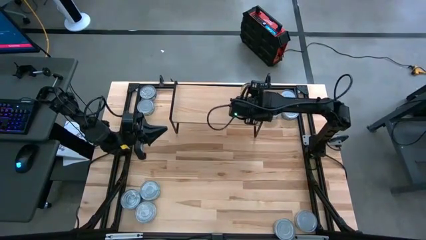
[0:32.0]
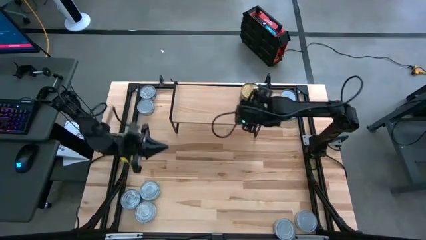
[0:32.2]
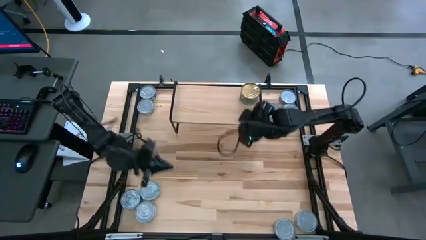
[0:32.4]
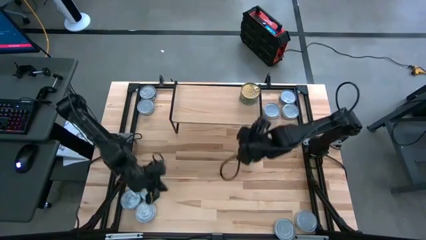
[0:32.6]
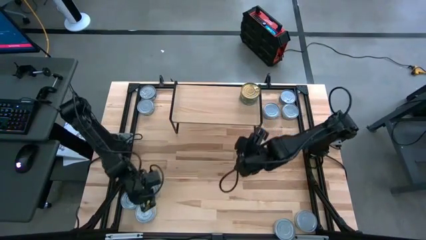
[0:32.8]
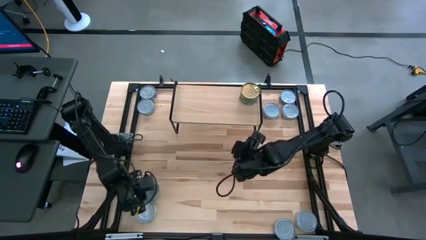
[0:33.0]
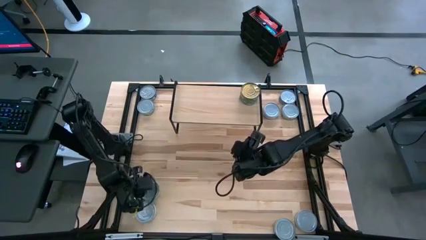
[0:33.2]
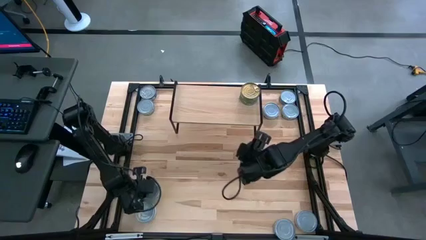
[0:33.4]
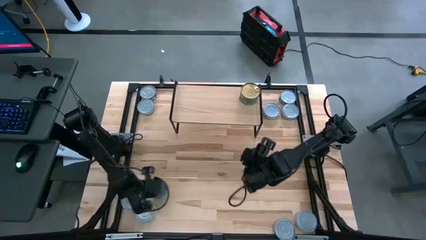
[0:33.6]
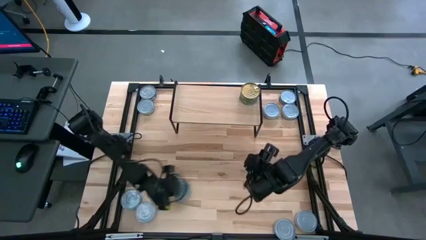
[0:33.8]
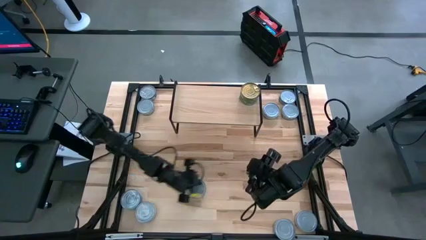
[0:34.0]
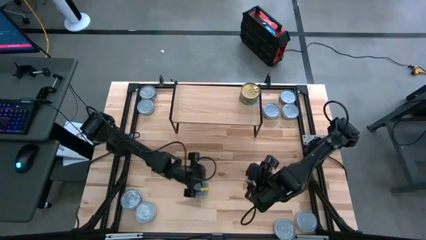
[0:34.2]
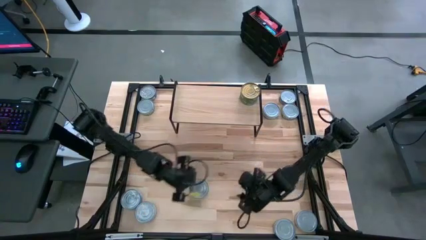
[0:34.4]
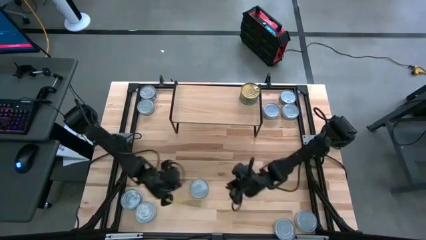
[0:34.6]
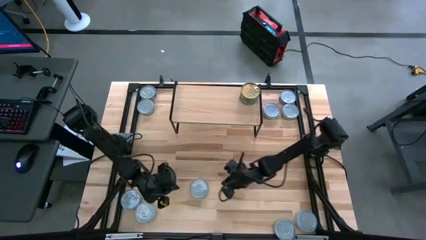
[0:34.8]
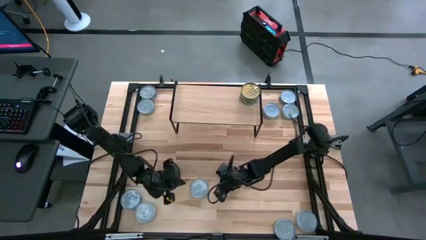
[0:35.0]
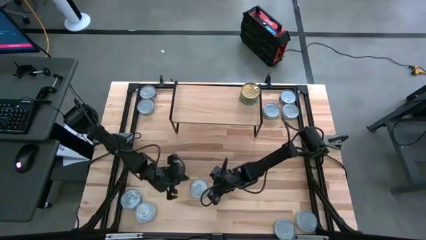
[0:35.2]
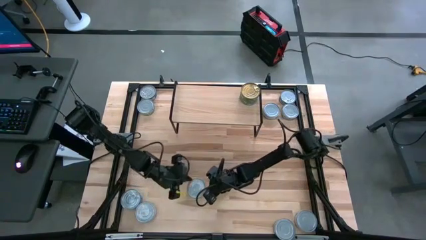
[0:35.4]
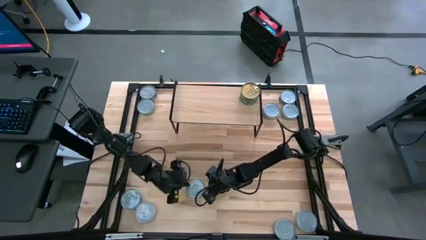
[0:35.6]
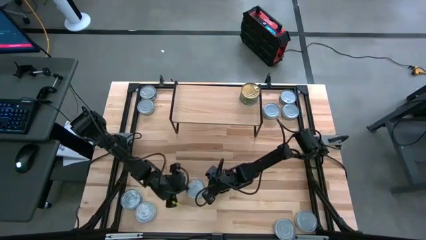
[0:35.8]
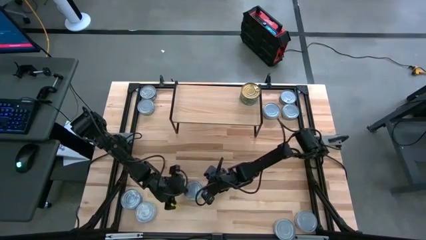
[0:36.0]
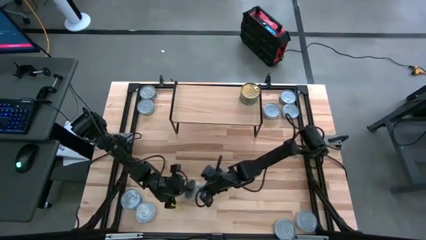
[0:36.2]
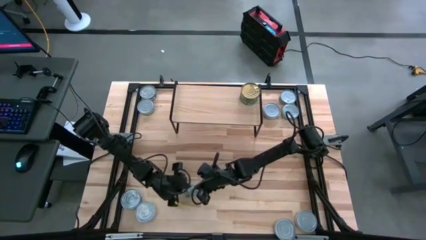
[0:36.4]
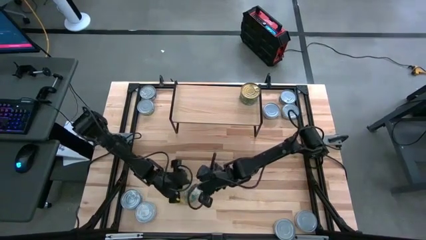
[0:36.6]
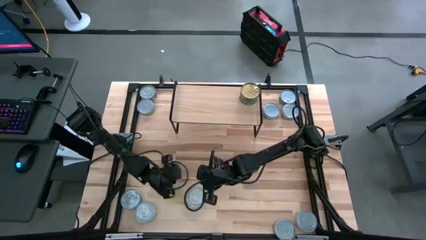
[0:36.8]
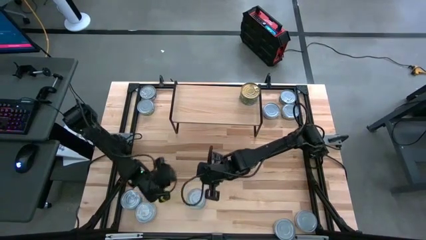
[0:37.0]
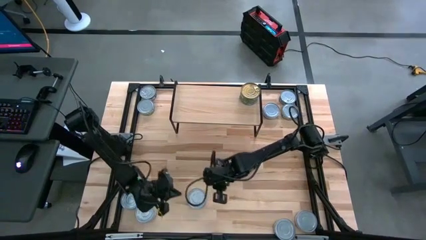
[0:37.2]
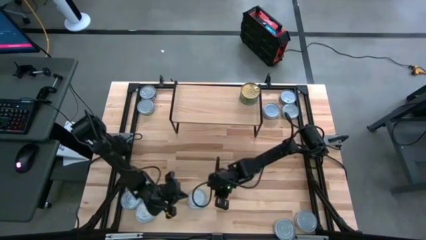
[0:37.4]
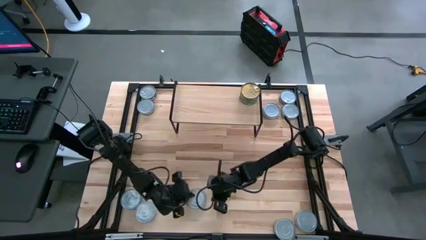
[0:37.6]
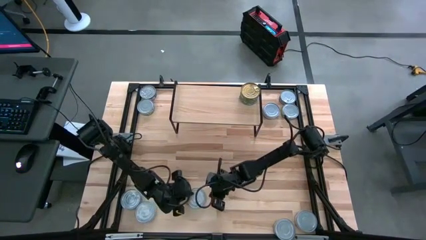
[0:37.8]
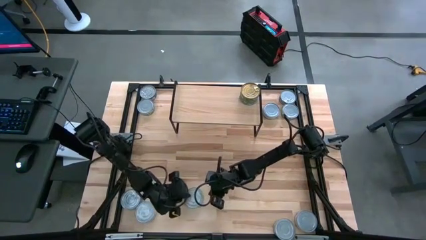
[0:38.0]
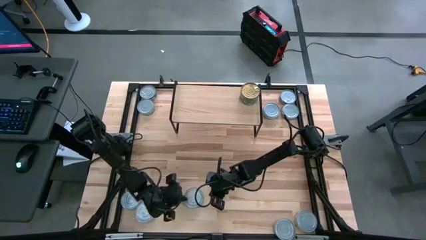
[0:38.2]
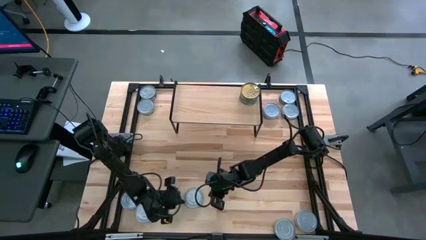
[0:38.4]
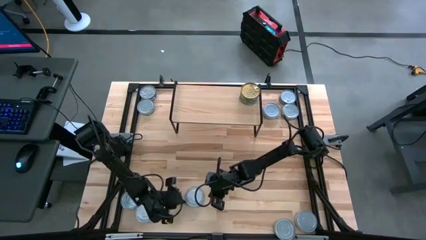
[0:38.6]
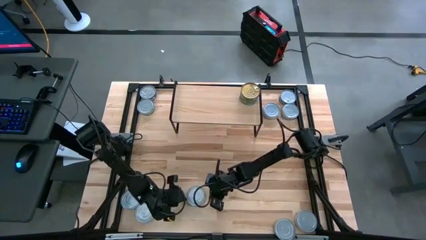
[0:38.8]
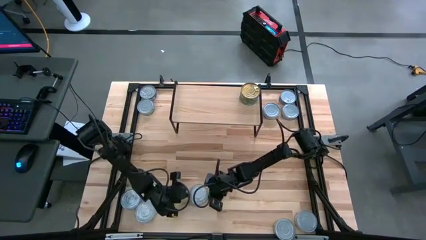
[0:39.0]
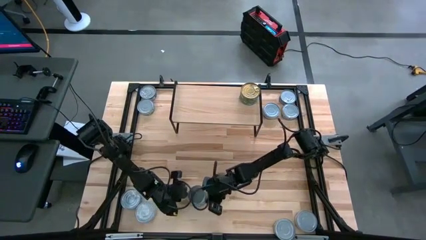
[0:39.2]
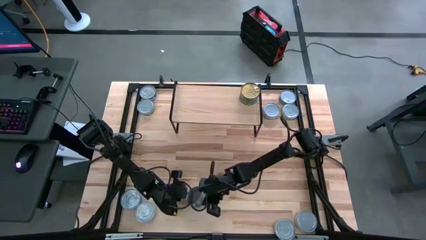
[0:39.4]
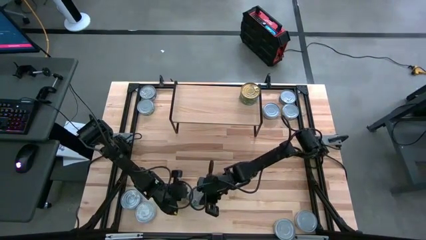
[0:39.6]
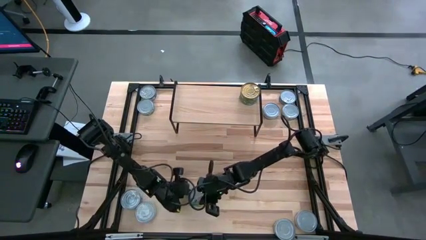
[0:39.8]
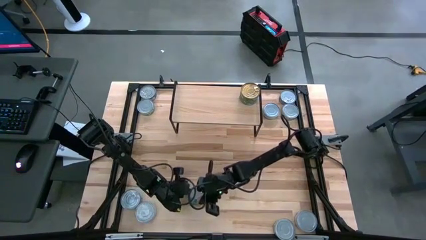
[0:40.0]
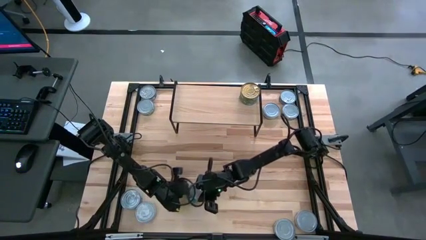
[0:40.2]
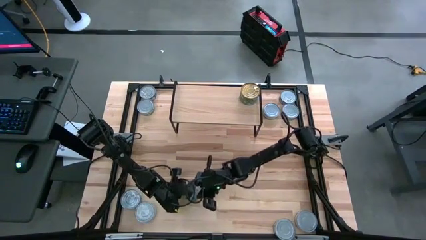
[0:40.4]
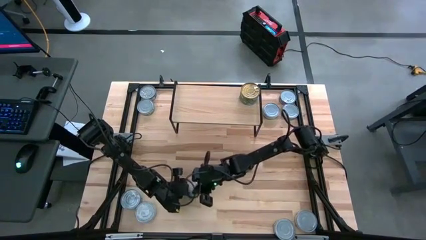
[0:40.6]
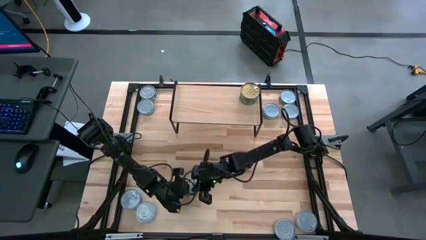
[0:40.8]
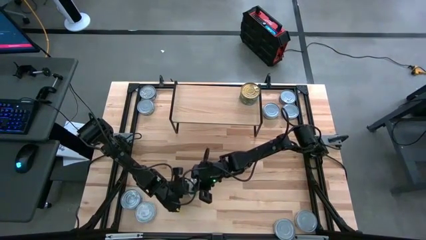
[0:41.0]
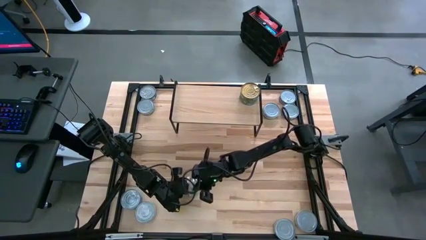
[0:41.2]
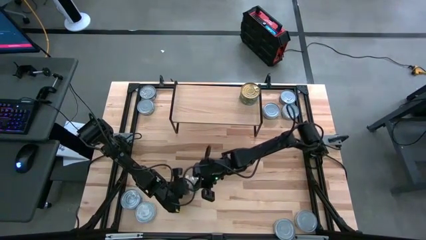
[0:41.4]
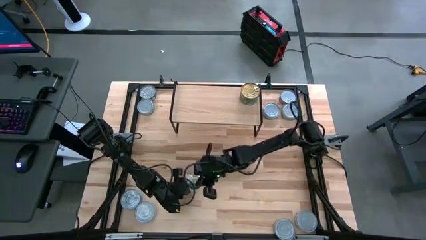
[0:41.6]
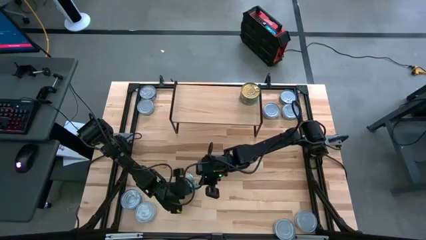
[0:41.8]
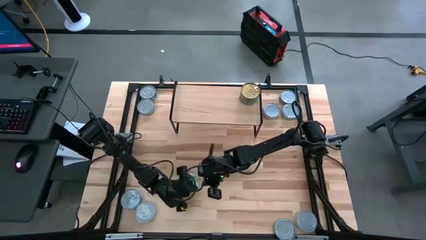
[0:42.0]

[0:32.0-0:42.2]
Task: Stack canned seafood by type on shelf
Put the light green tuna can on the shelf

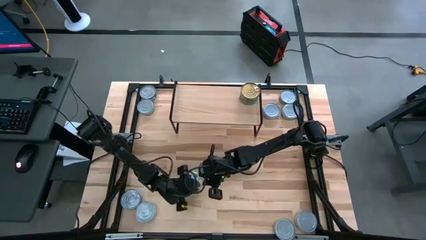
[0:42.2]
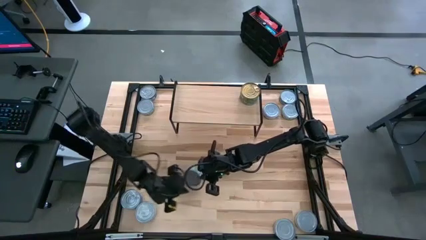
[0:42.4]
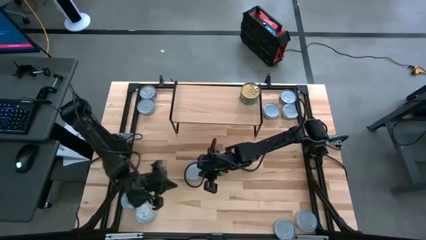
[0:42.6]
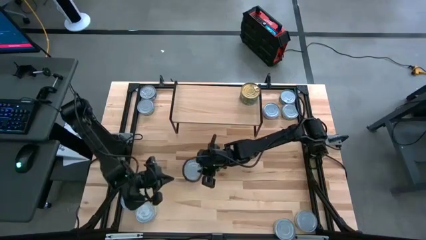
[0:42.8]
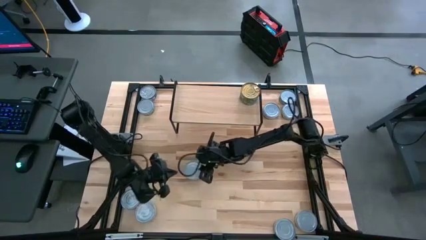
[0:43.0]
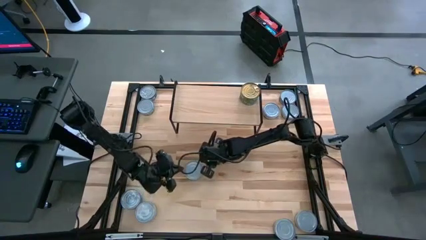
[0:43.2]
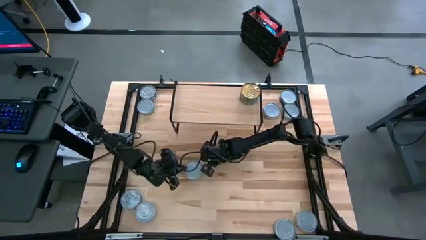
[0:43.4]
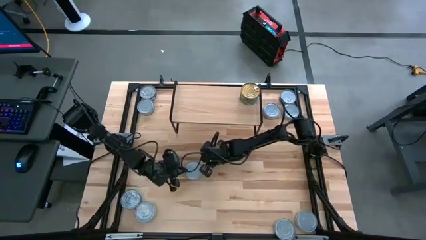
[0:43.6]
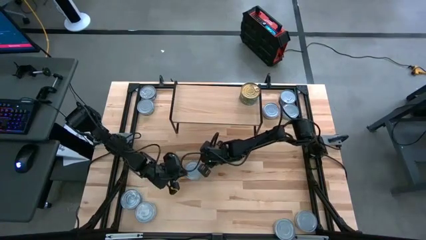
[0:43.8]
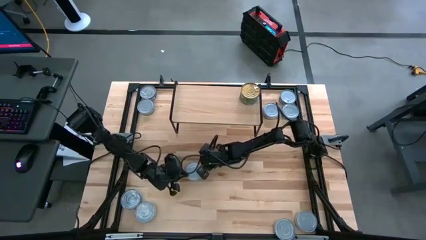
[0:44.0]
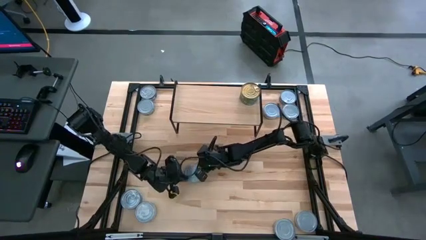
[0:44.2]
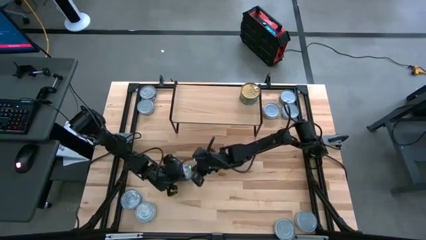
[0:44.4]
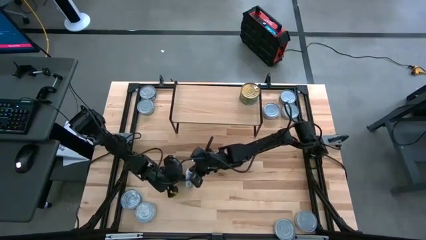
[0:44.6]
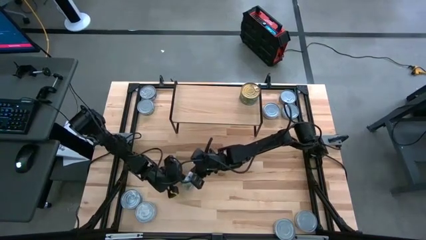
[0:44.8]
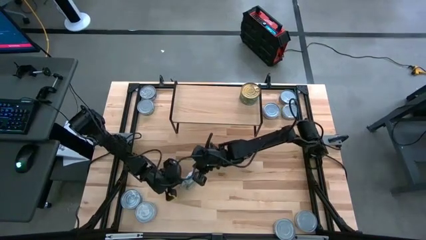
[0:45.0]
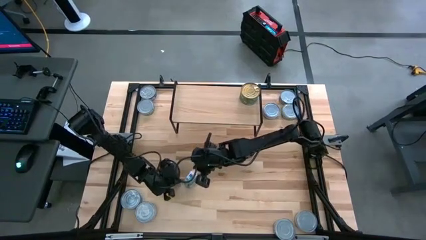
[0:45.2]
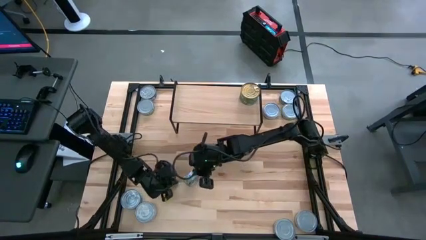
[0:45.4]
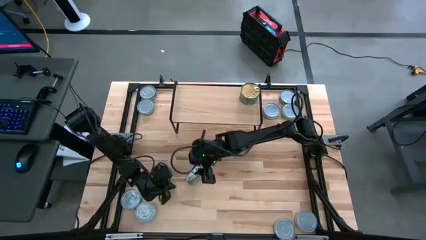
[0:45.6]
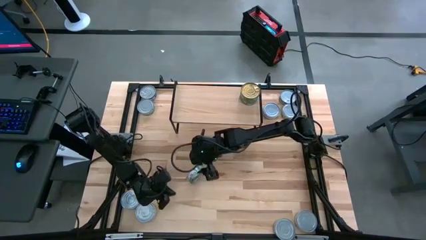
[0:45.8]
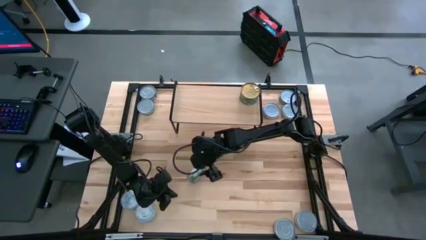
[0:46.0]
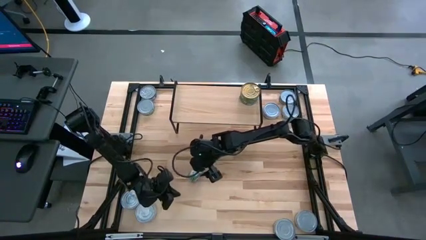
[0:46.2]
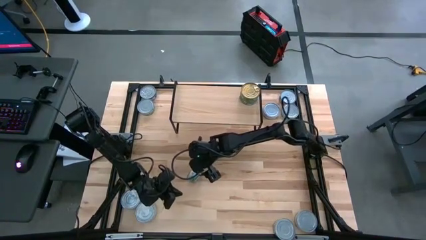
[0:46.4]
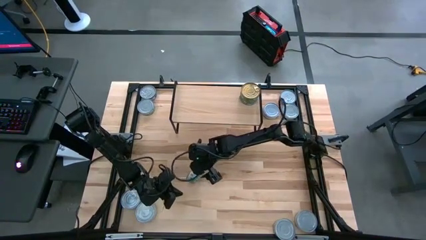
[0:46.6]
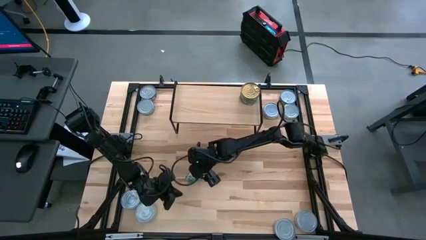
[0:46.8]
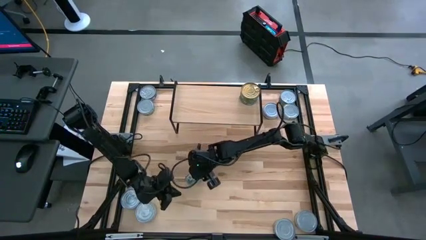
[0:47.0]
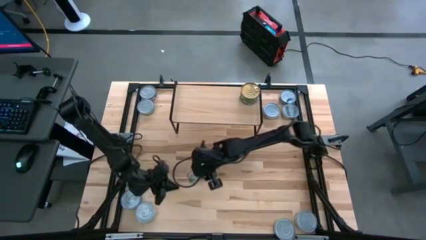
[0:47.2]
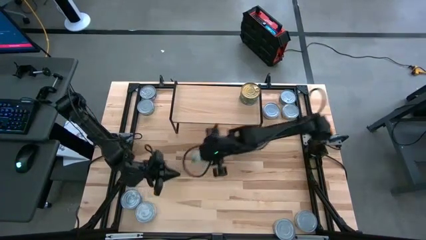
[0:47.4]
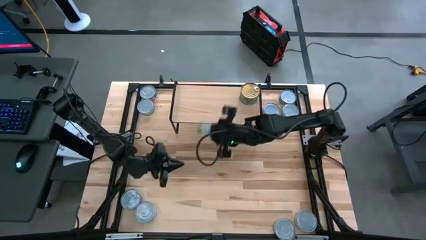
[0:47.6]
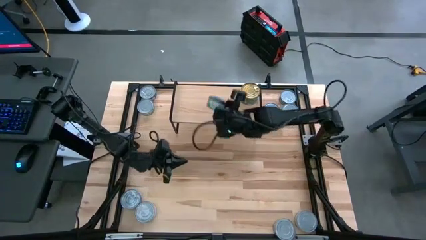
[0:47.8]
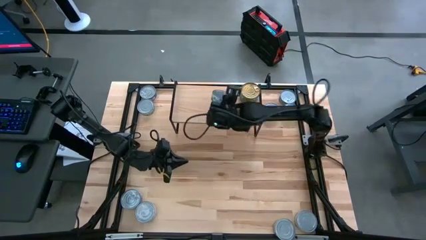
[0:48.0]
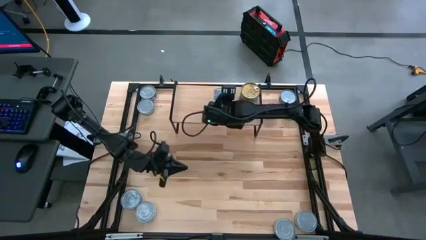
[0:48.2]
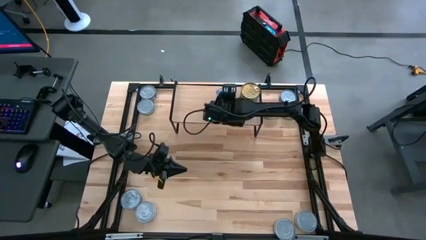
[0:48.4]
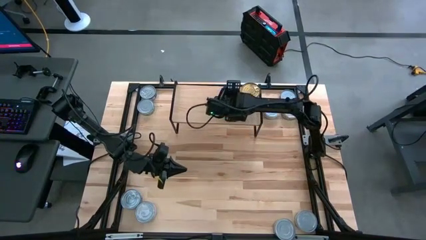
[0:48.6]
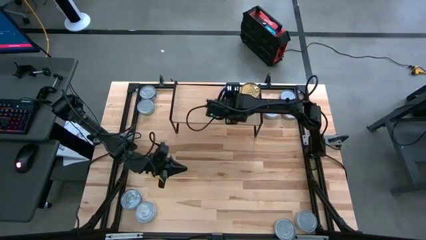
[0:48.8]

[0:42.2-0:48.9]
Put the light green tuna can on the shelf
